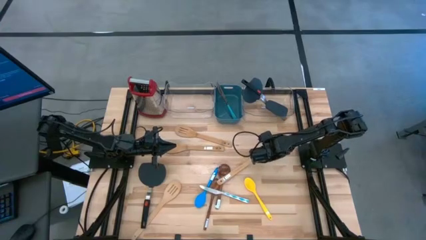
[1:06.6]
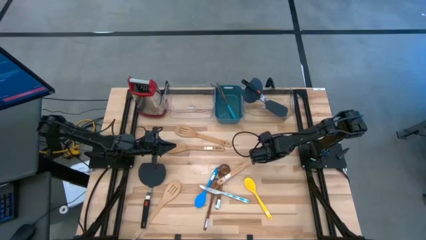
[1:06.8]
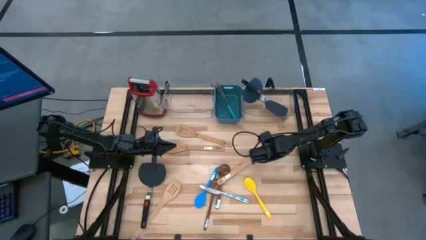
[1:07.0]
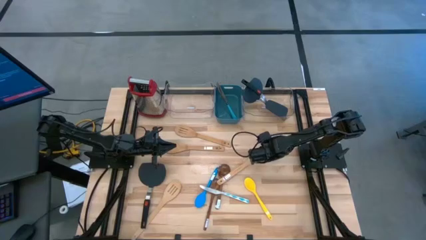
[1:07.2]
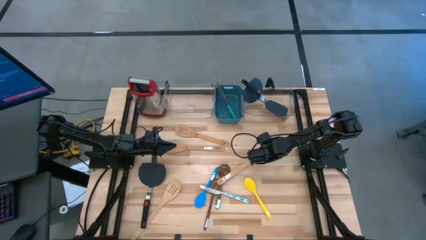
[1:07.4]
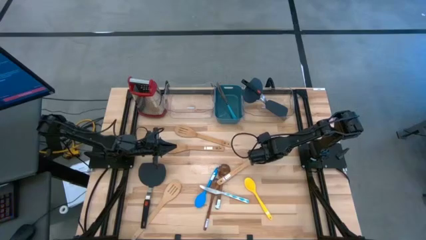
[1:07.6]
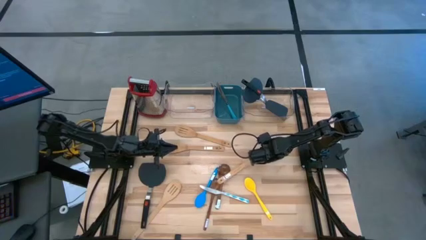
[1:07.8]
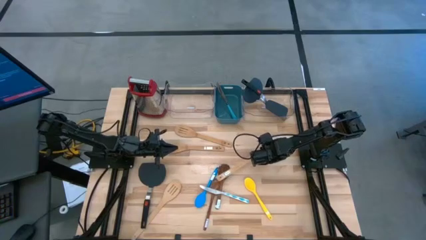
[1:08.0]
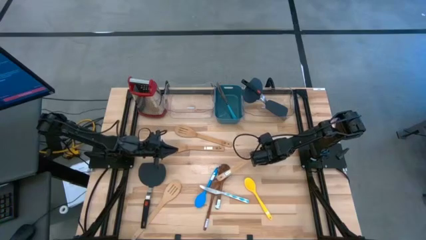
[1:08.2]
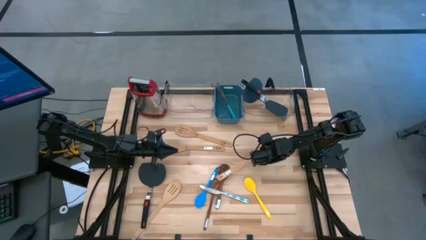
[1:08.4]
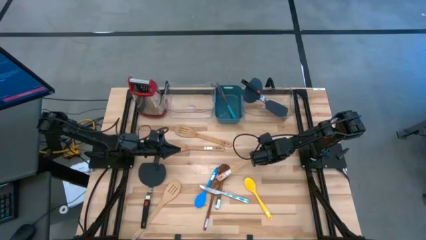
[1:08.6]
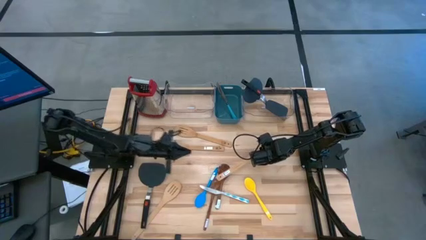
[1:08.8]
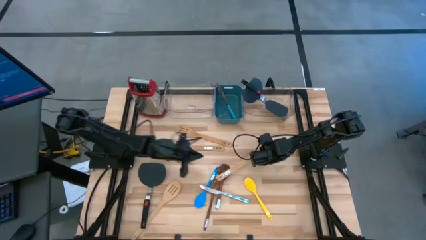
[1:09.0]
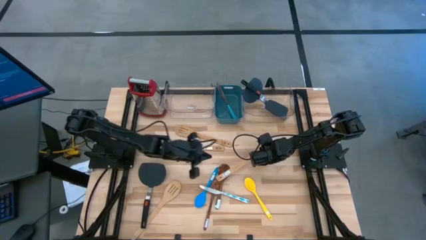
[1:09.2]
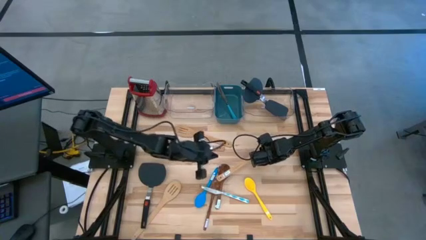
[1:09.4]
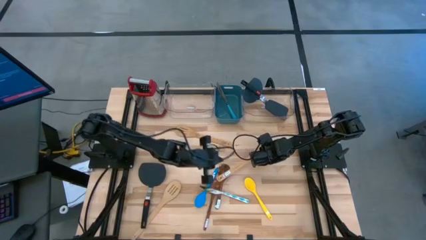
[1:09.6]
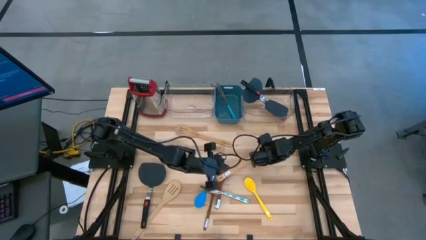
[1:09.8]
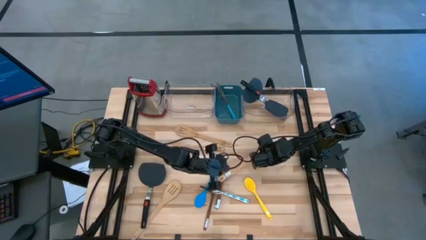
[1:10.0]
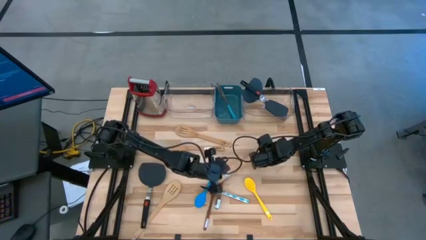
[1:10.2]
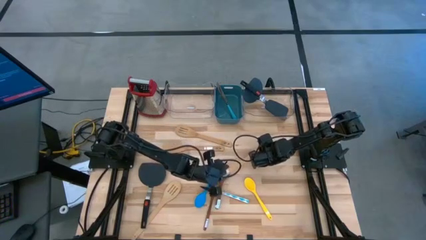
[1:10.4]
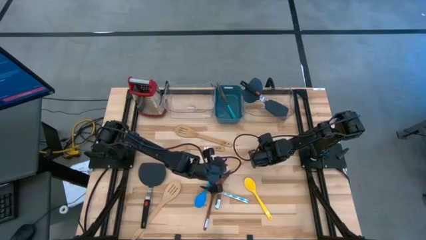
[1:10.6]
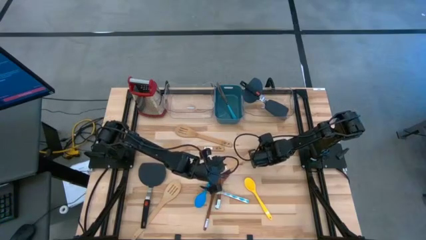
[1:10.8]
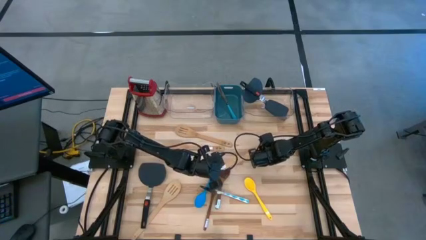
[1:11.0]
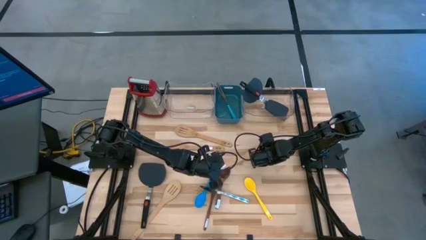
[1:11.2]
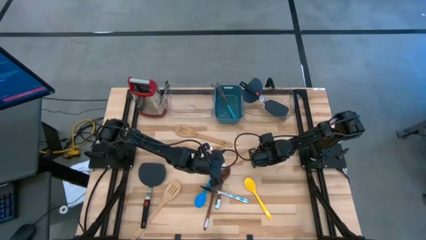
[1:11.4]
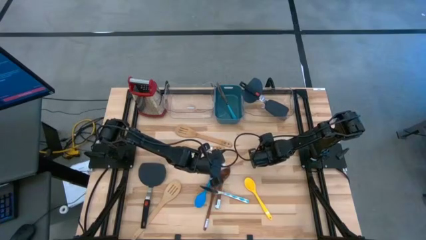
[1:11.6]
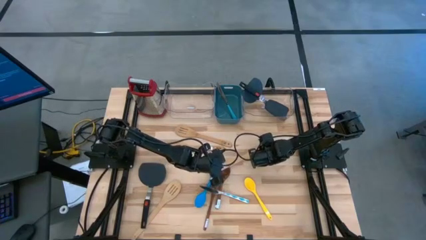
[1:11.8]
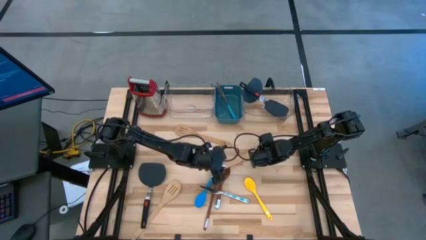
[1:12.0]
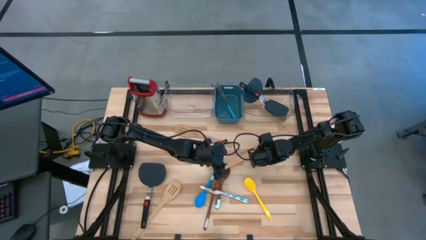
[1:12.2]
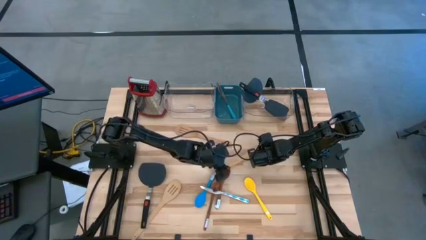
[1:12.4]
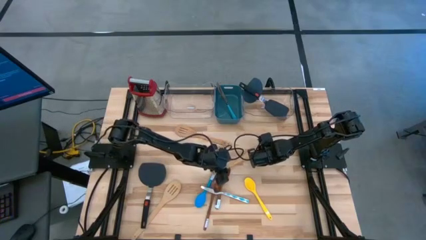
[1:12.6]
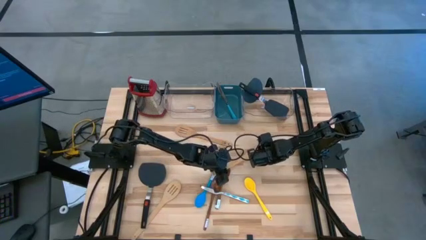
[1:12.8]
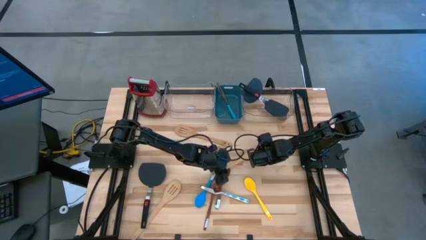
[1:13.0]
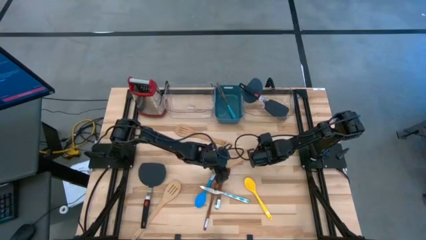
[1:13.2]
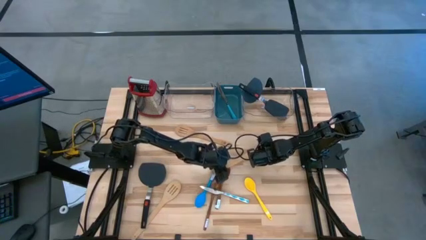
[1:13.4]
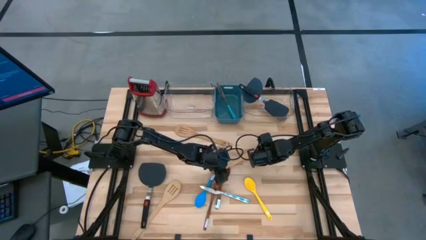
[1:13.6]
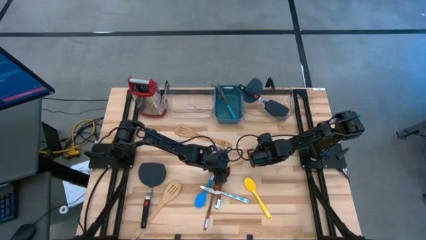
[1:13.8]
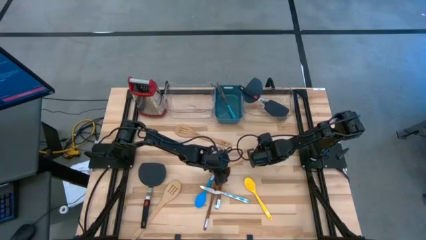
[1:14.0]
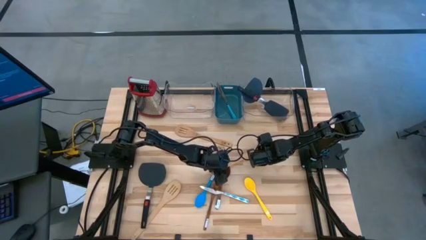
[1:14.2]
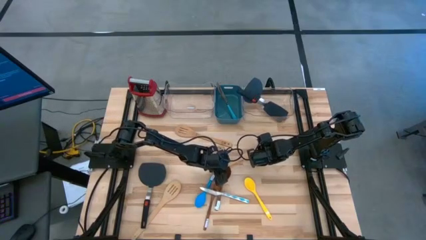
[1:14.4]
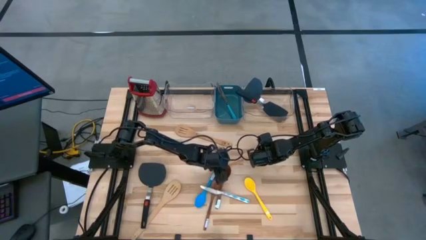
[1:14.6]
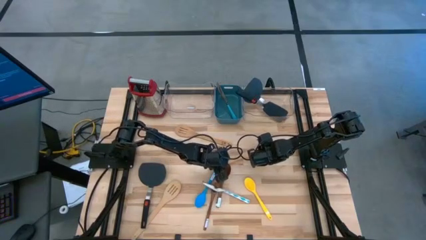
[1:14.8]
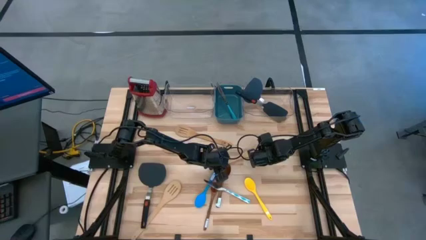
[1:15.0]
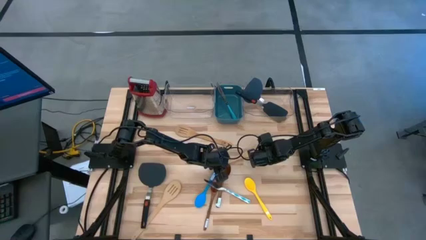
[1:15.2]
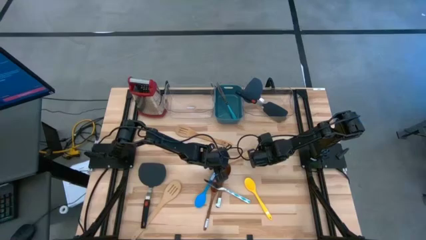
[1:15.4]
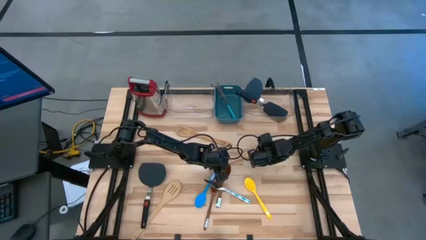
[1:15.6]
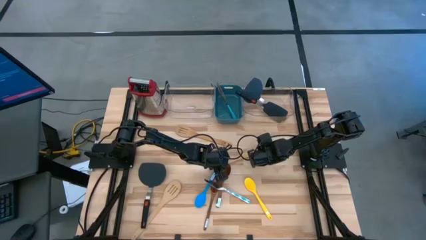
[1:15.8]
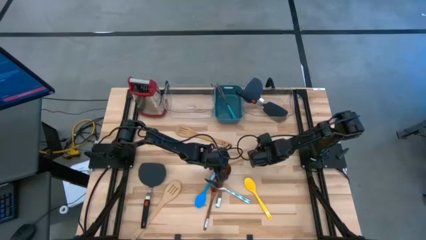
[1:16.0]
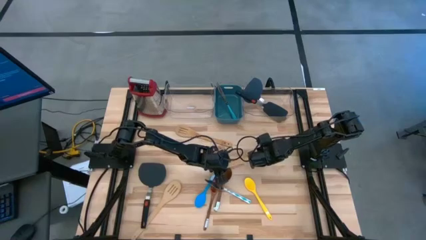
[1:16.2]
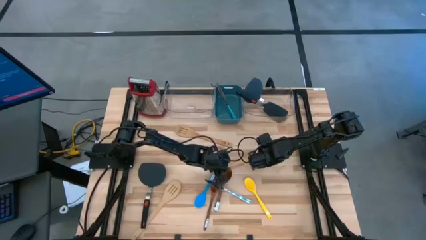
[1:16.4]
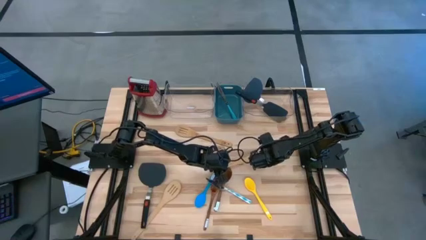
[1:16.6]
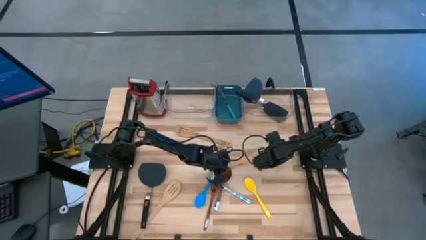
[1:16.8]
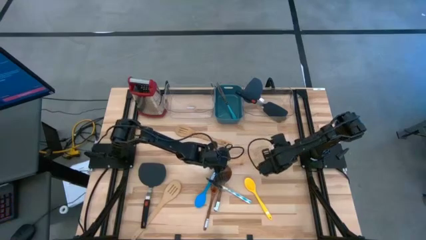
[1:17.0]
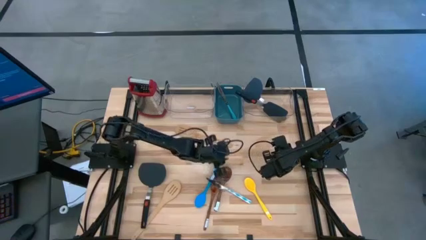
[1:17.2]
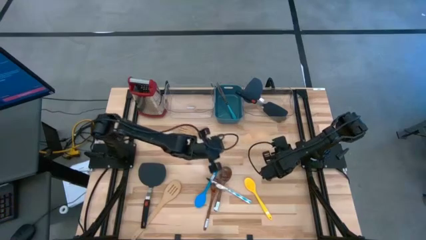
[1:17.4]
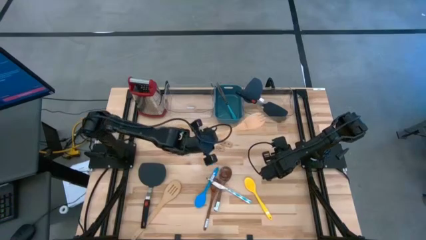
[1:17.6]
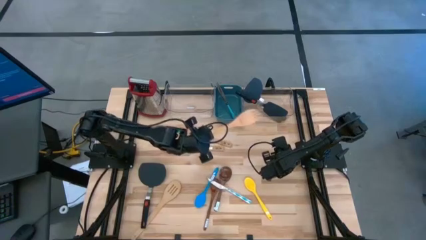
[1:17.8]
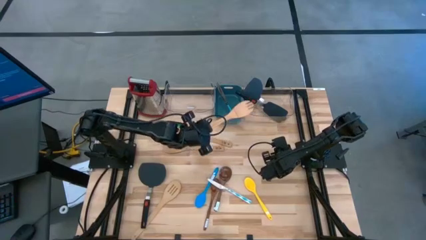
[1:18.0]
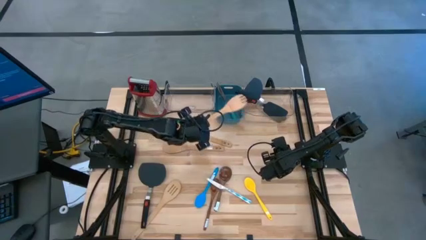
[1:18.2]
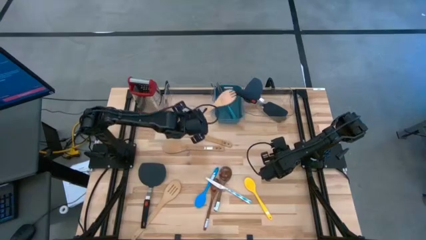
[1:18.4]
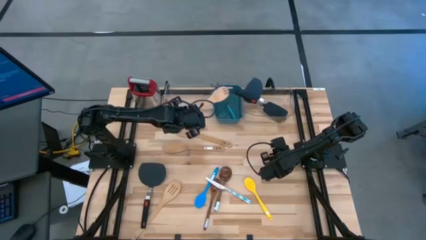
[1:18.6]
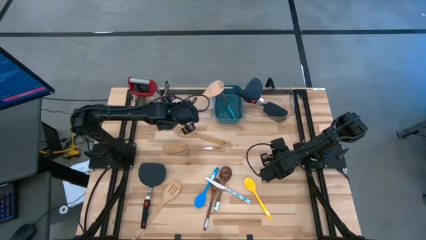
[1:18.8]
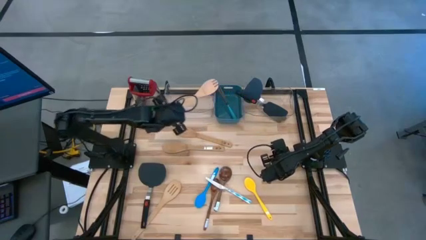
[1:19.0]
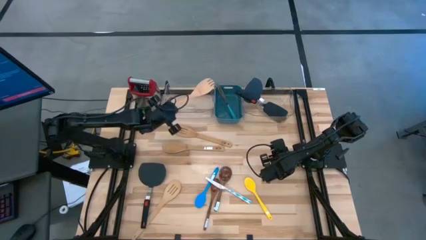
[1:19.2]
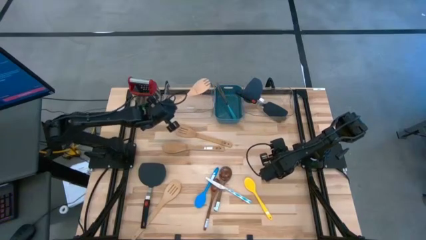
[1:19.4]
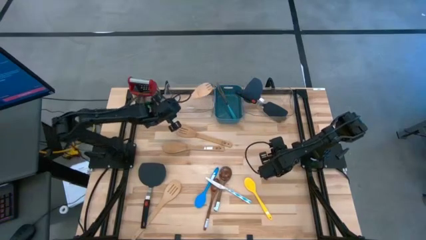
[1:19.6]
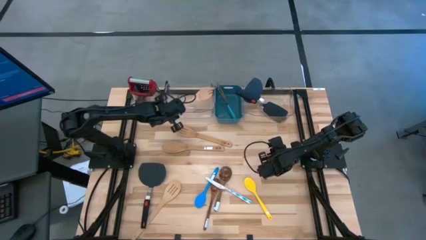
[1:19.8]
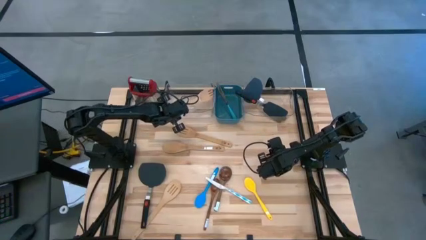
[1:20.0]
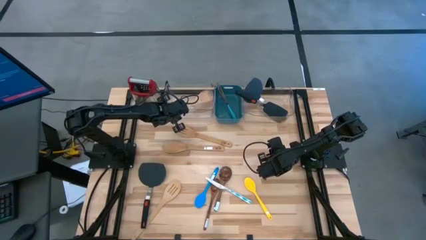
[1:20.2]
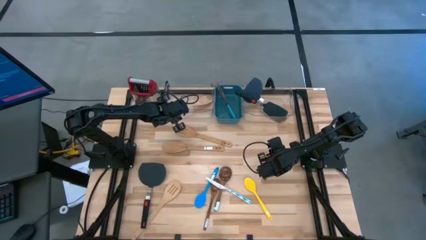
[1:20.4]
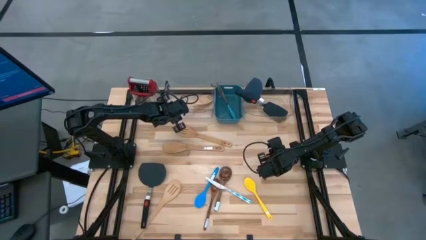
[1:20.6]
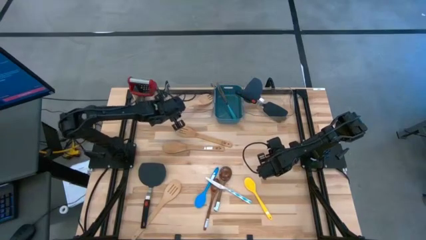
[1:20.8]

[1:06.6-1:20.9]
Task: Pick & Place Kitchen Items
Put the brown spork into the left transparent bin
